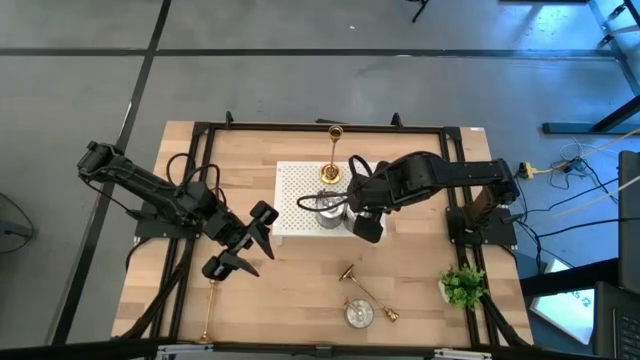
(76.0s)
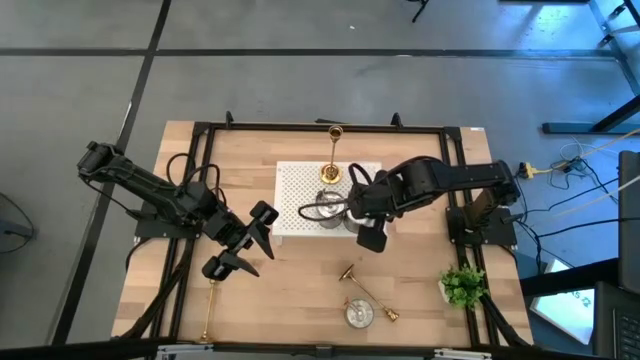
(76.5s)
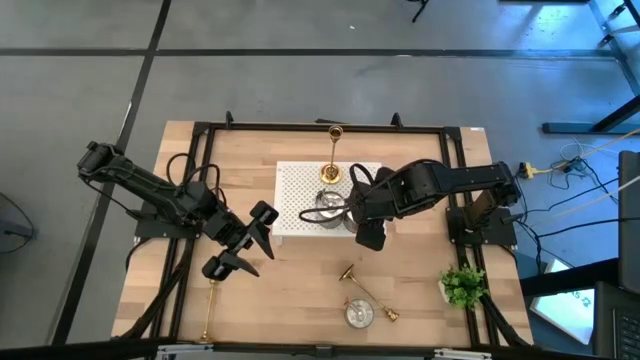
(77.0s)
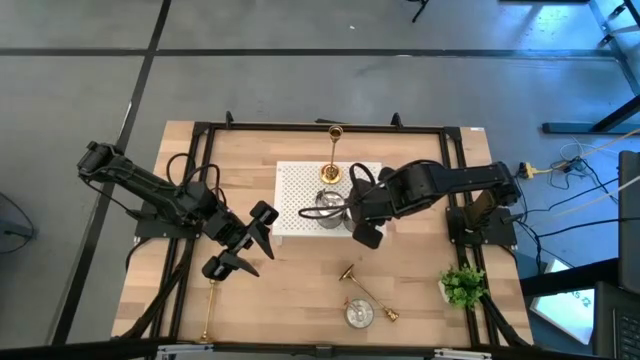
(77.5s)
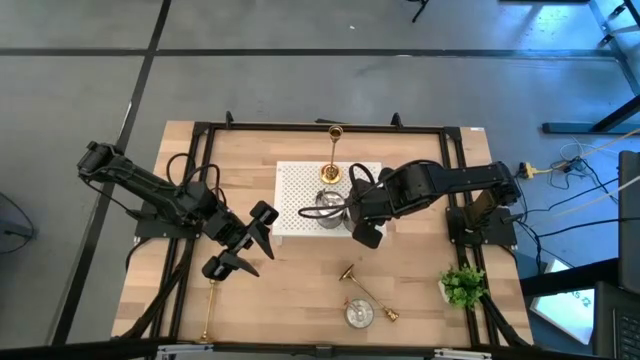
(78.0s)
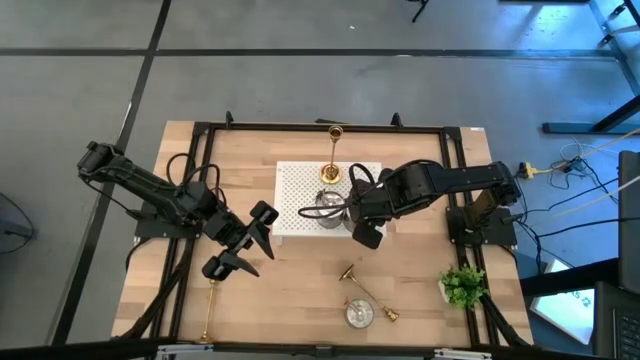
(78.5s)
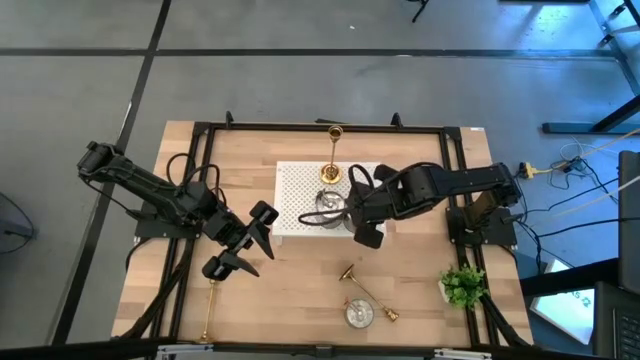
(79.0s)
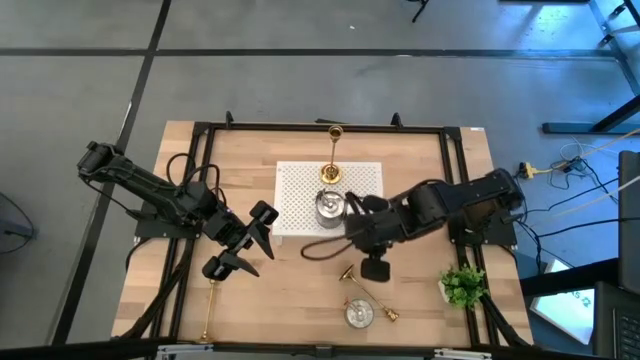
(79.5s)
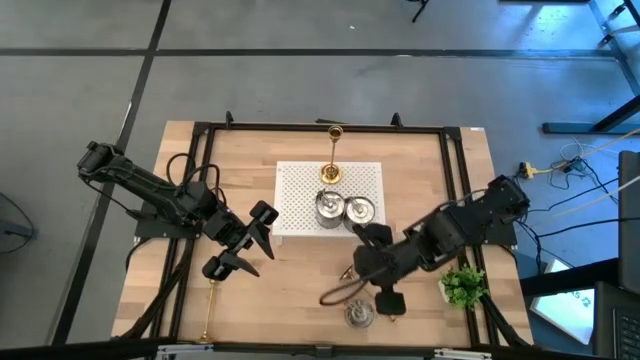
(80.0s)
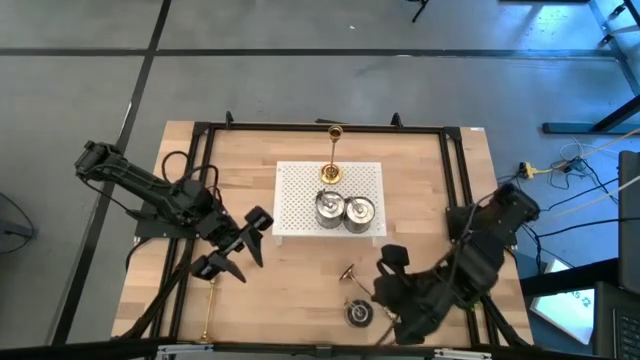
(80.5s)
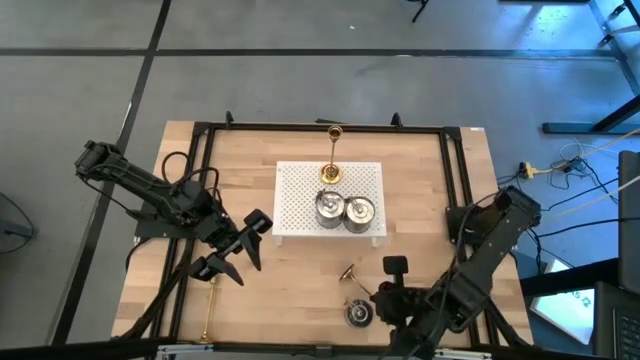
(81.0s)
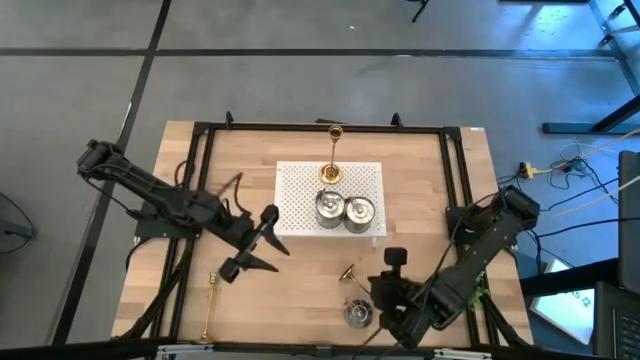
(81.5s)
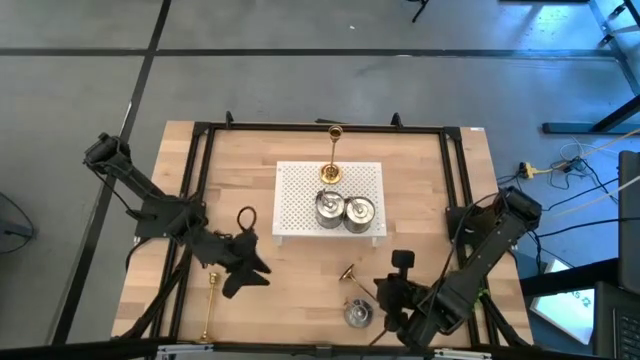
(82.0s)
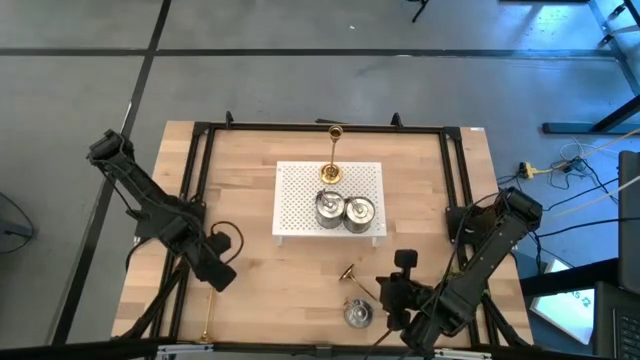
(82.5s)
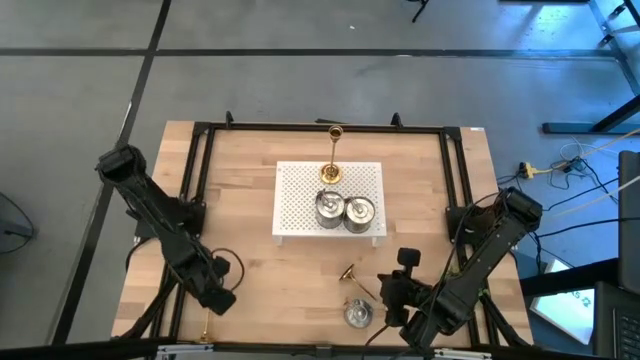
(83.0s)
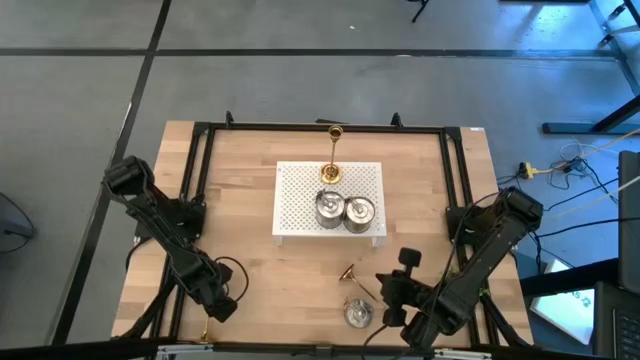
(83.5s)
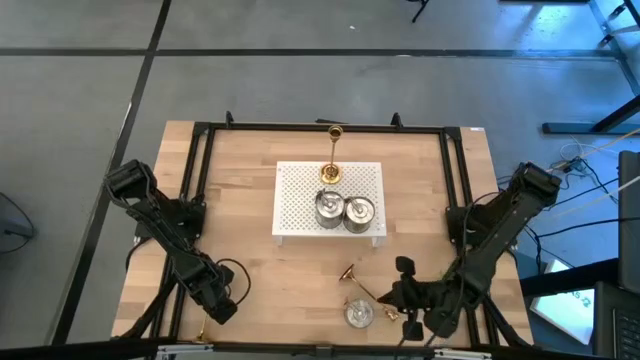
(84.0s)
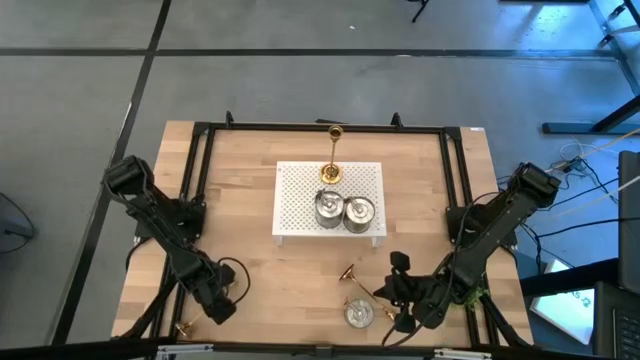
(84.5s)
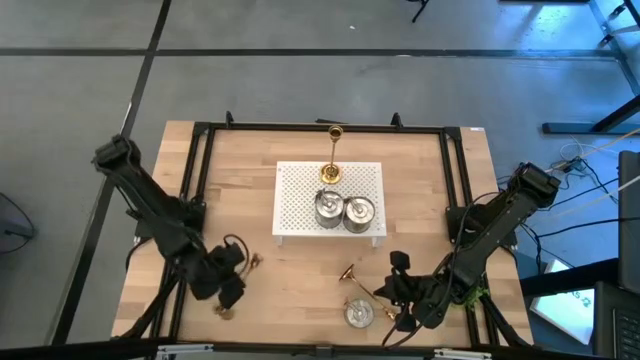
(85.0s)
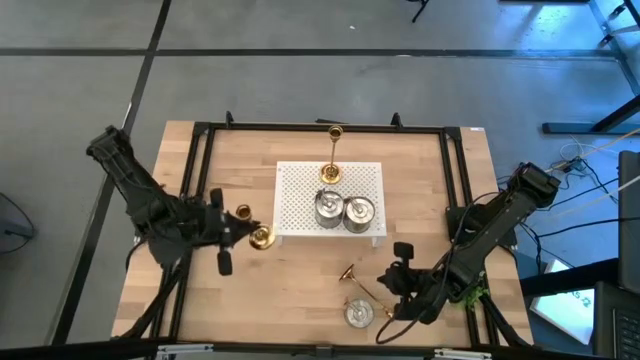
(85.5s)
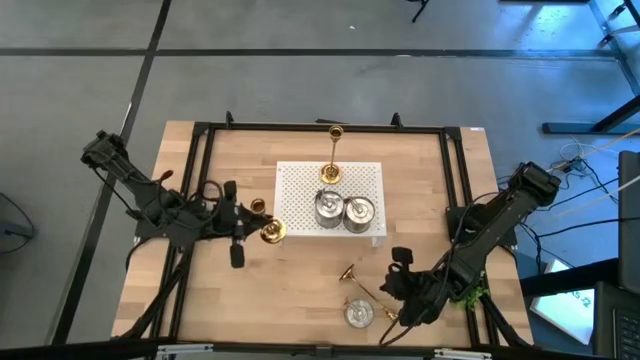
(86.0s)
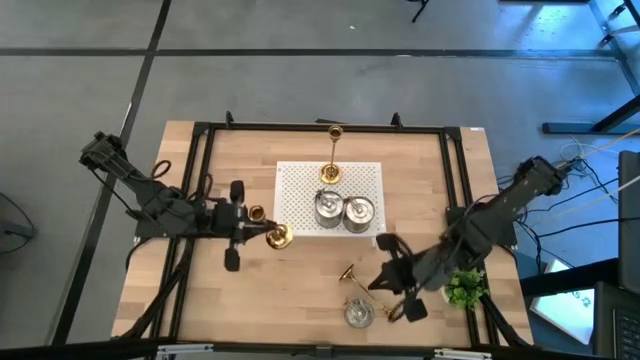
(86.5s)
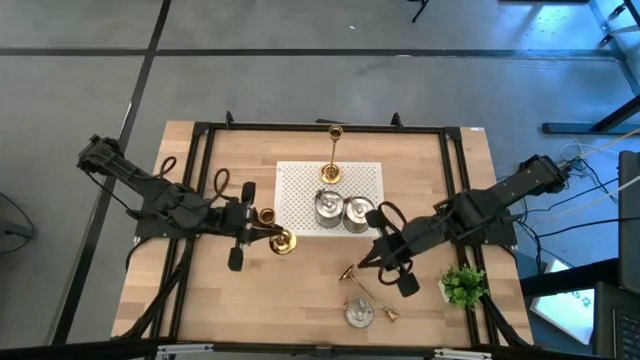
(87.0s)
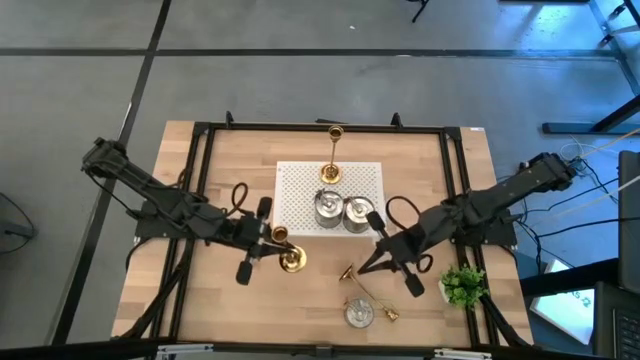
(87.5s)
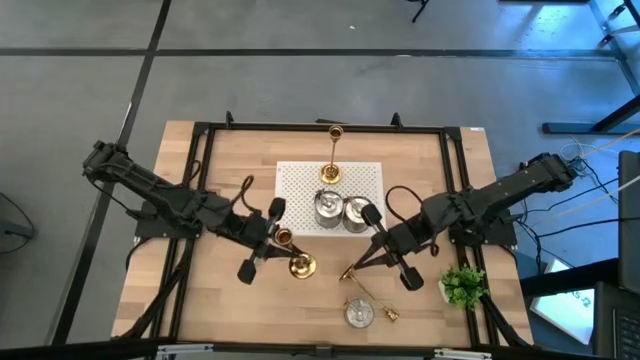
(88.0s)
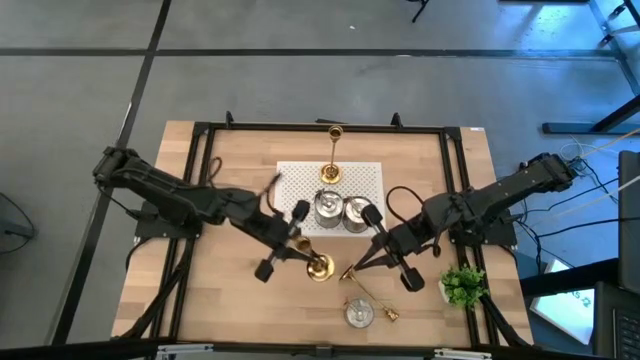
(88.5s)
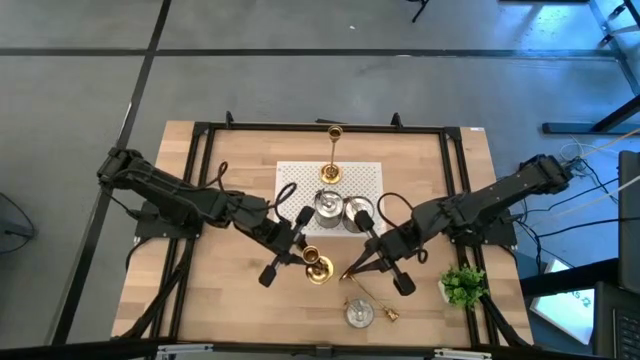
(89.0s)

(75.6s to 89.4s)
Task: Pick & Place candle stick holders
Put the left gold candle holder on the shelf aligned with the other gold candle holder

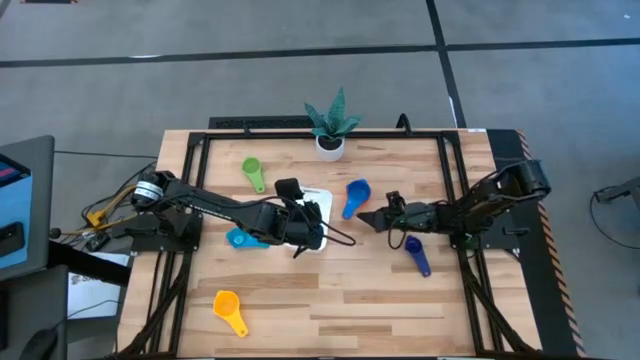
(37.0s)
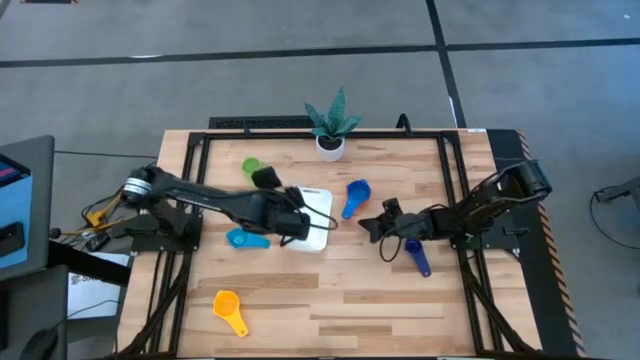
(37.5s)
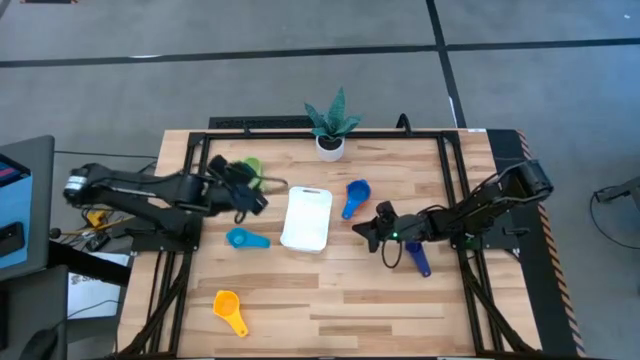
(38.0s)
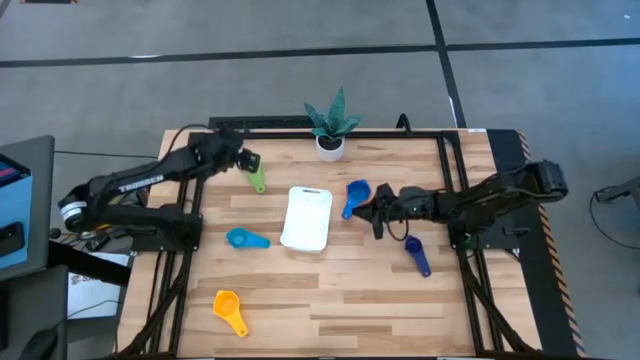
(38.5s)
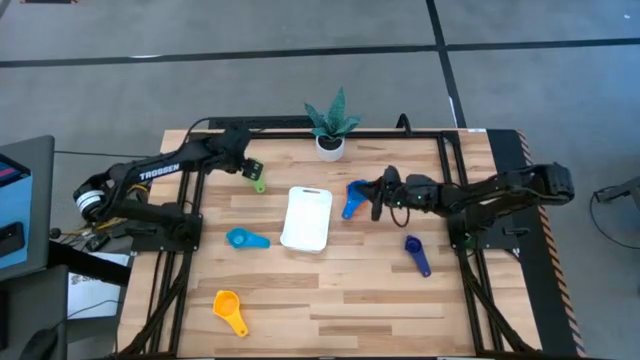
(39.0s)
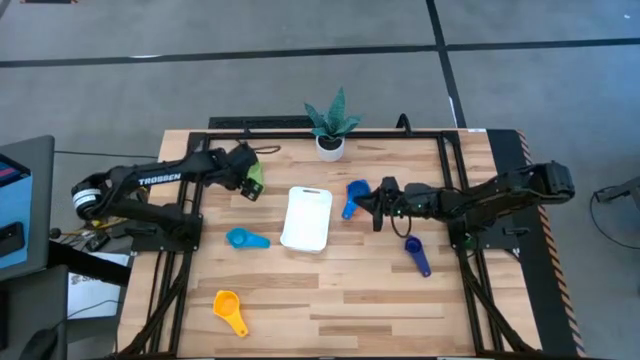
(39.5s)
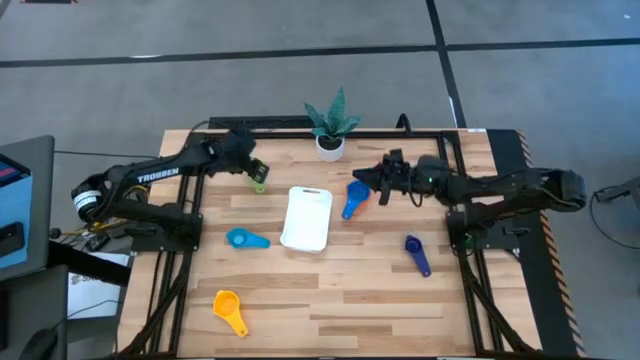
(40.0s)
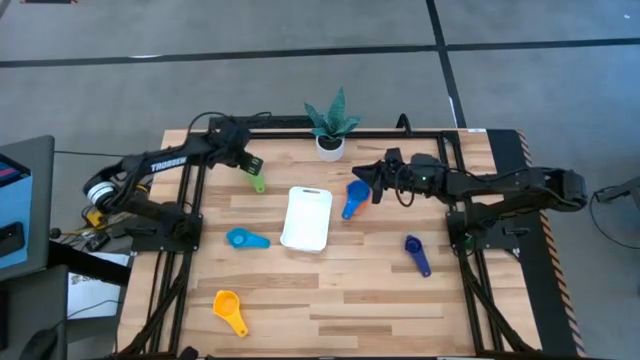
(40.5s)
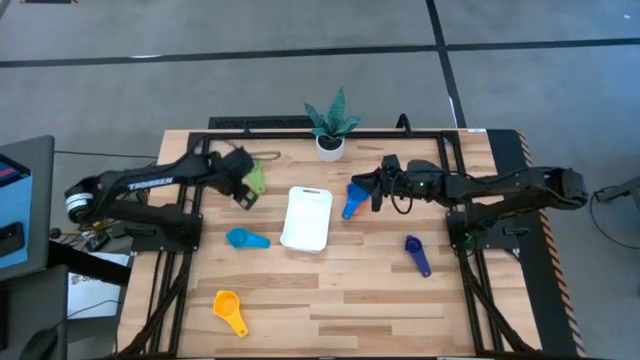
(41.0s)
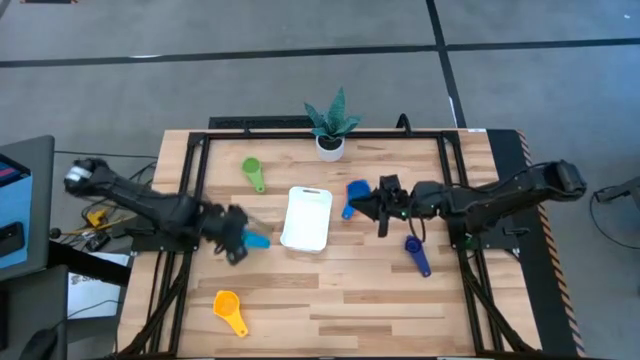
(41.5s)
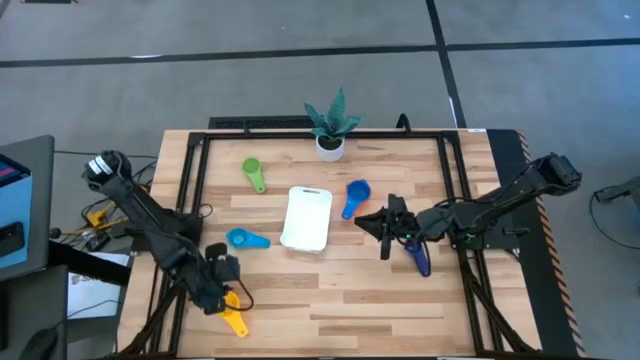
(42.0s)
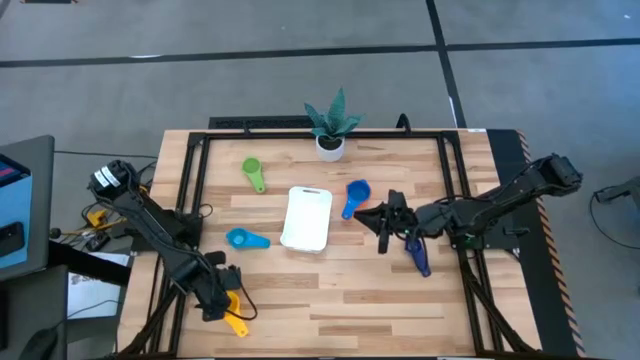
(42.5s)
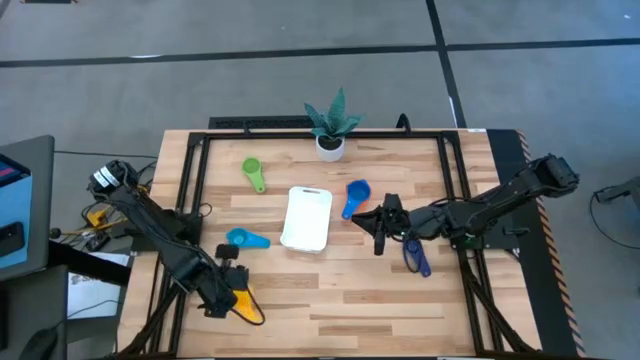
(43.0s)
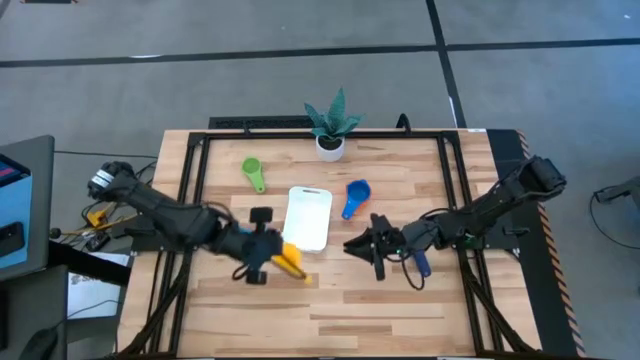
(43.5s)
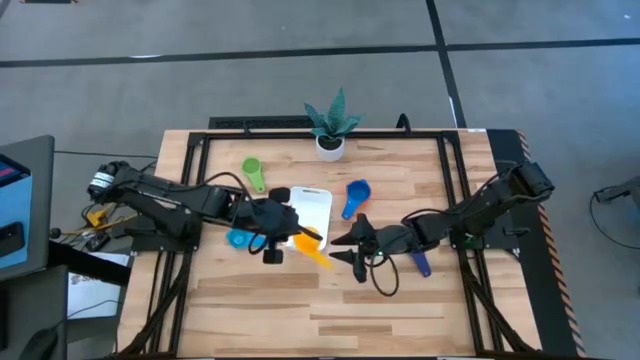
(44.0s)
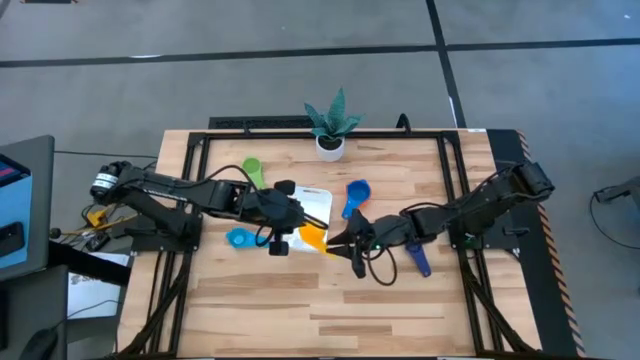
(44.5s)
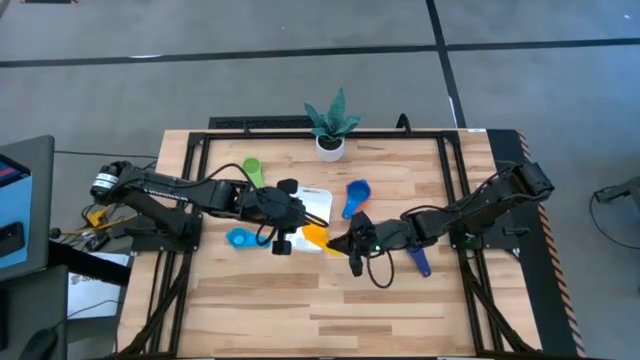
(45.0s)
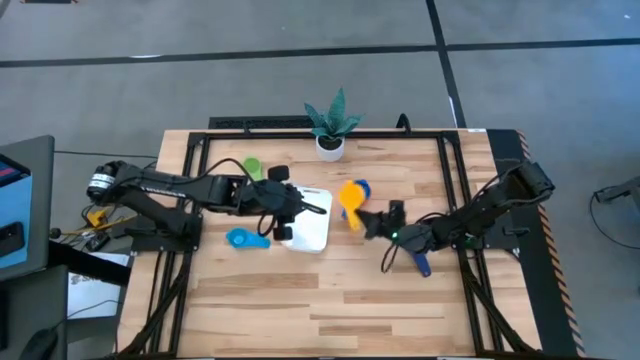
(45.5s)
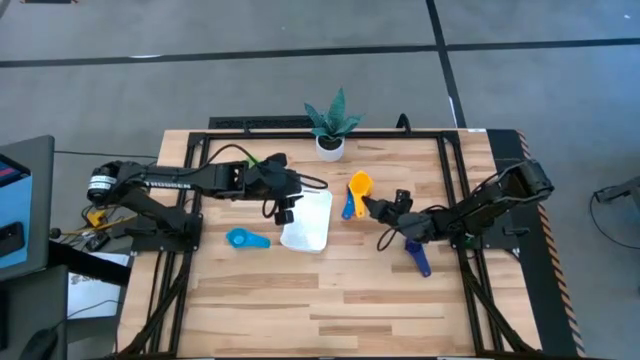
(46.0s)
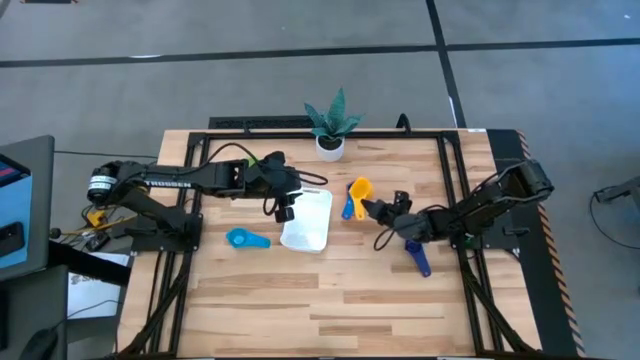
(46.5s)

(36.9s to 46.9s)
Task: Nest measuring cups in basket
Stack the yellow measuring cup on top of the blue measuring cup
